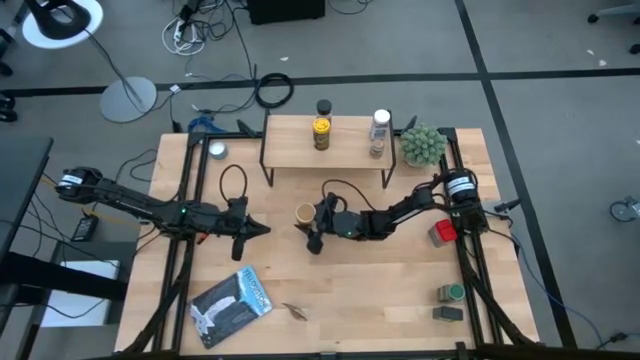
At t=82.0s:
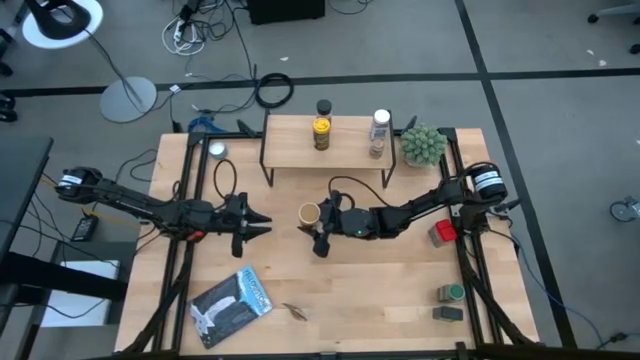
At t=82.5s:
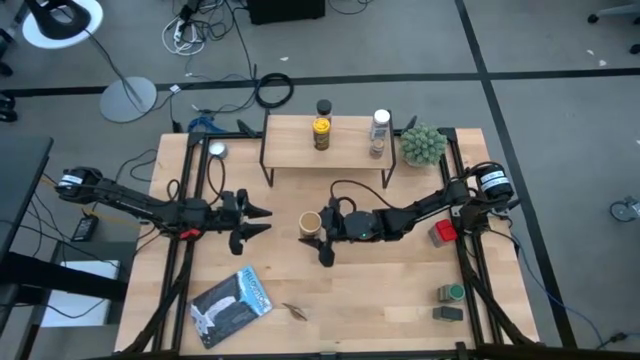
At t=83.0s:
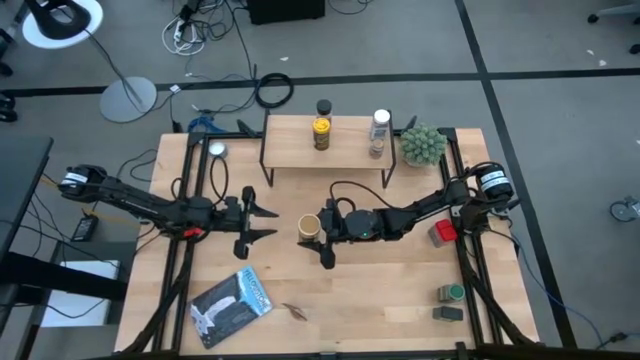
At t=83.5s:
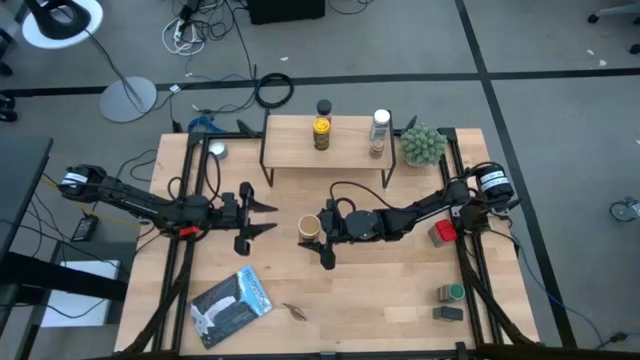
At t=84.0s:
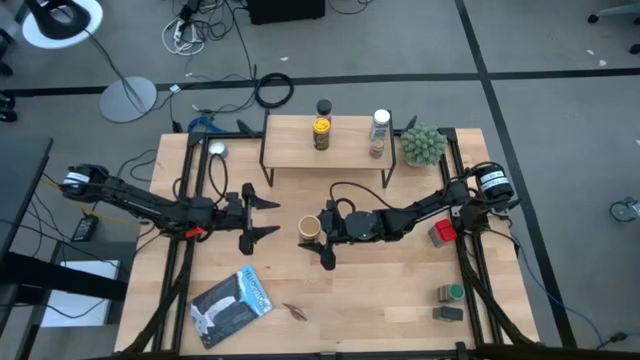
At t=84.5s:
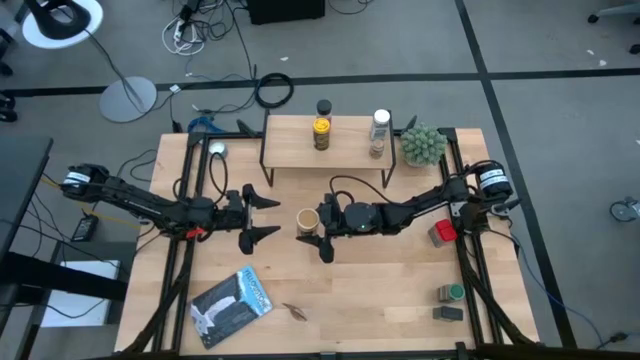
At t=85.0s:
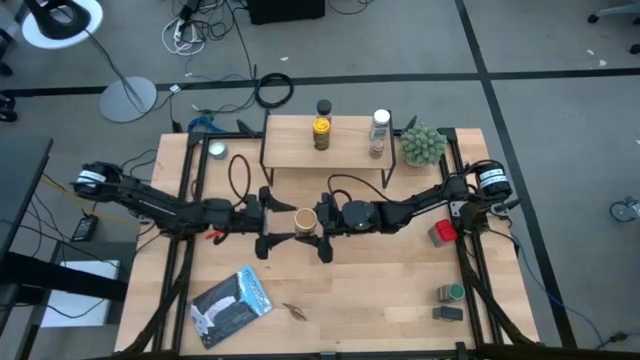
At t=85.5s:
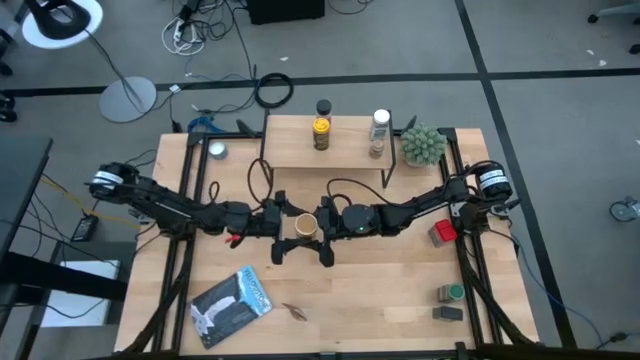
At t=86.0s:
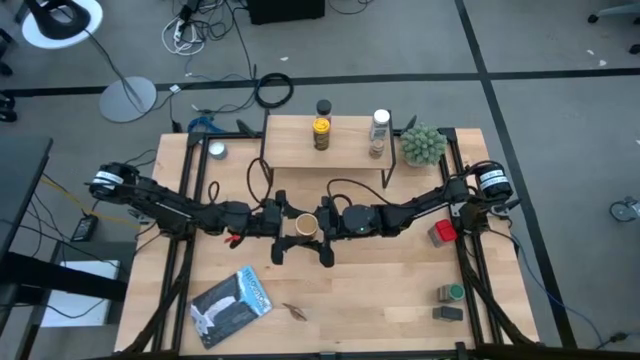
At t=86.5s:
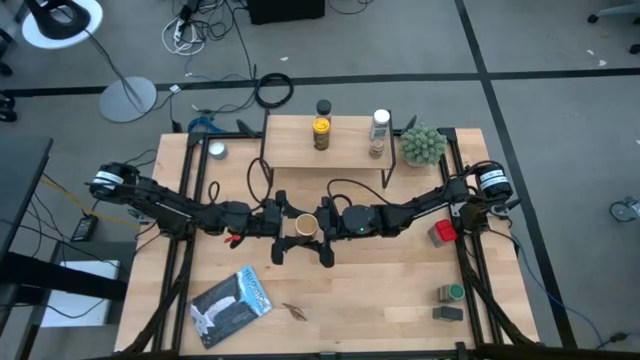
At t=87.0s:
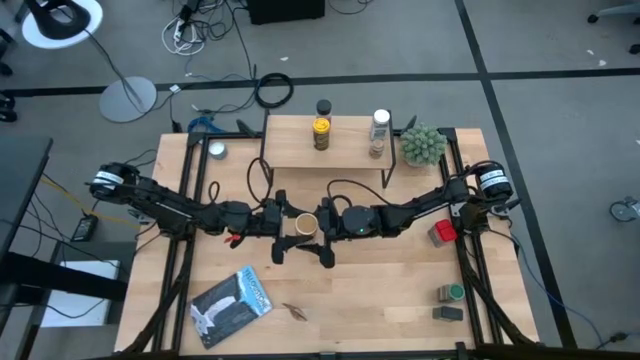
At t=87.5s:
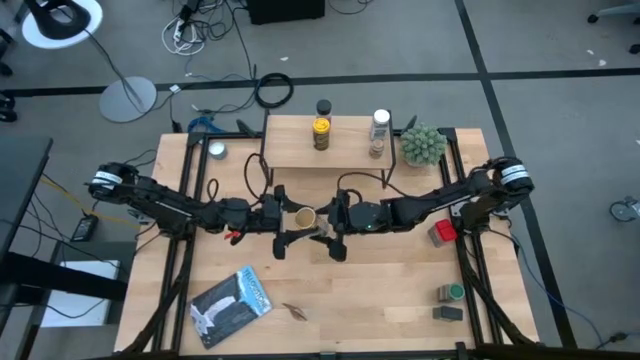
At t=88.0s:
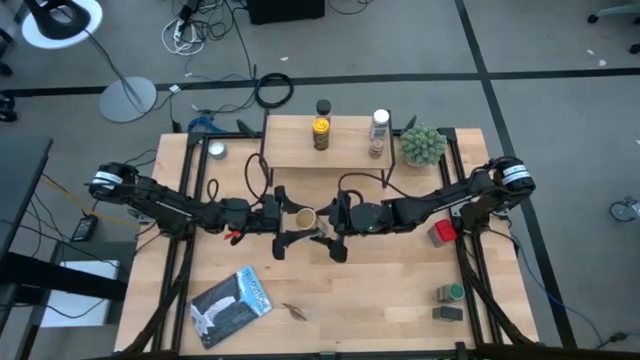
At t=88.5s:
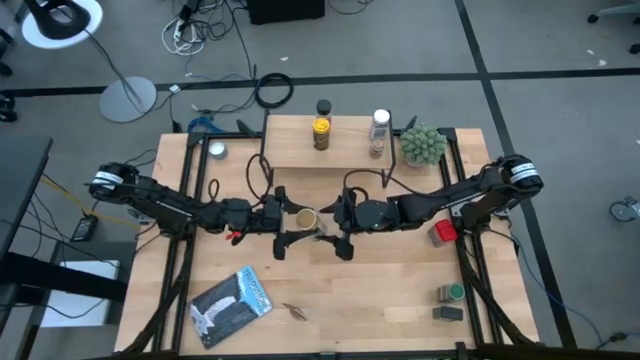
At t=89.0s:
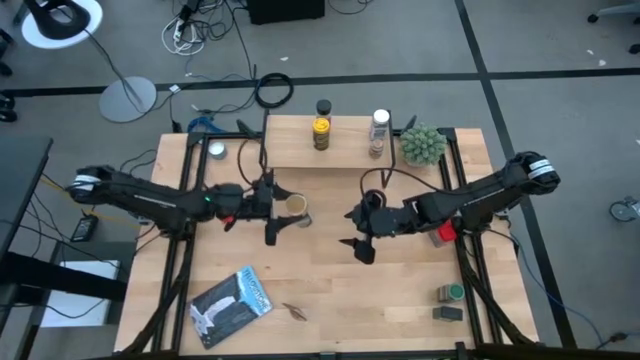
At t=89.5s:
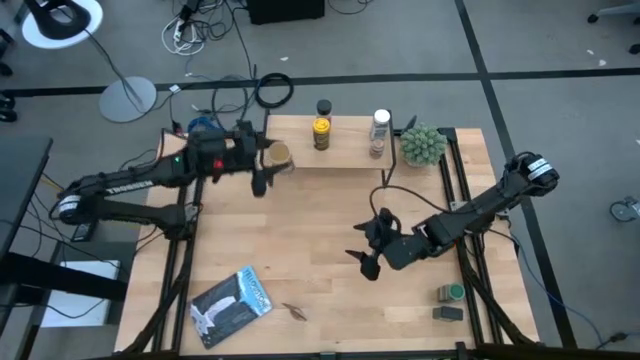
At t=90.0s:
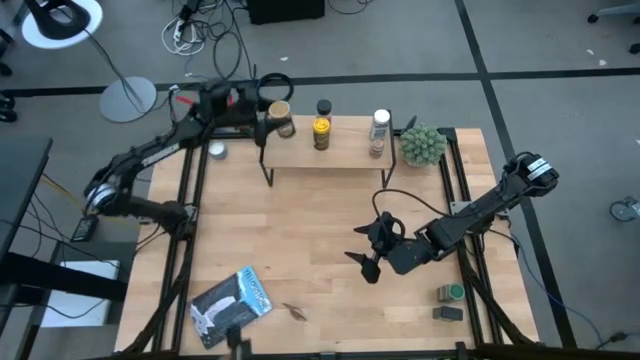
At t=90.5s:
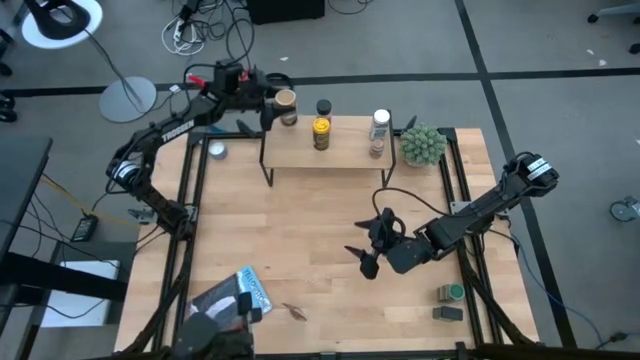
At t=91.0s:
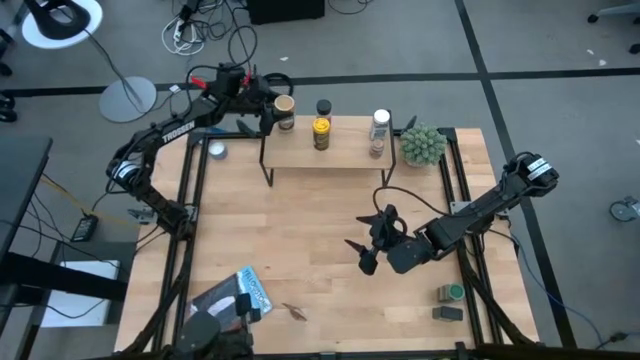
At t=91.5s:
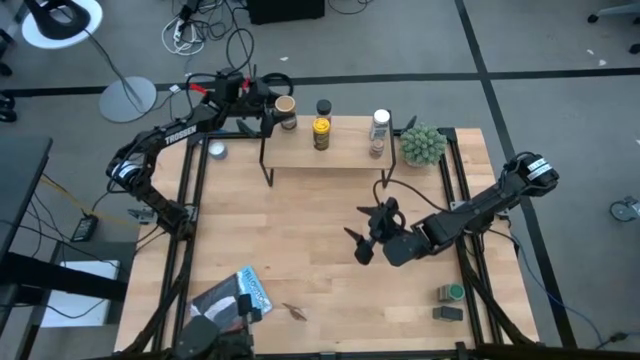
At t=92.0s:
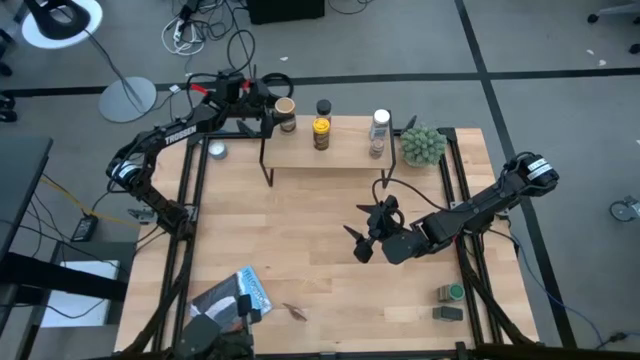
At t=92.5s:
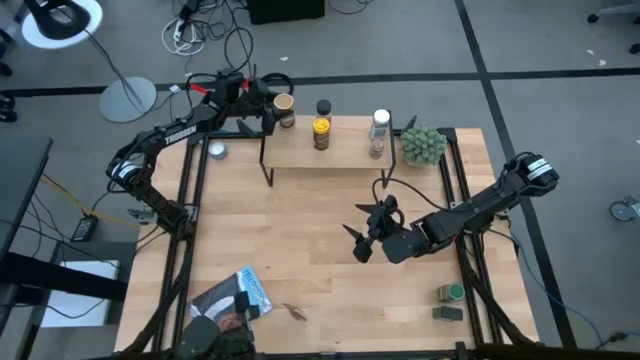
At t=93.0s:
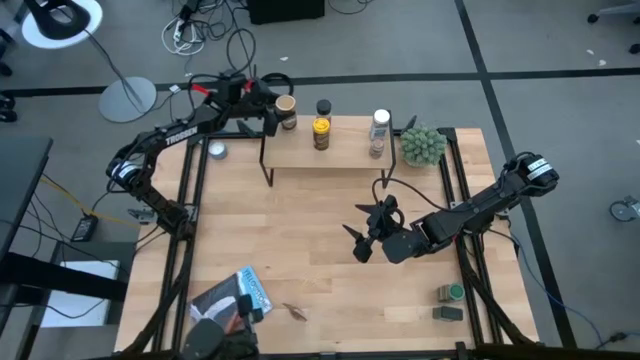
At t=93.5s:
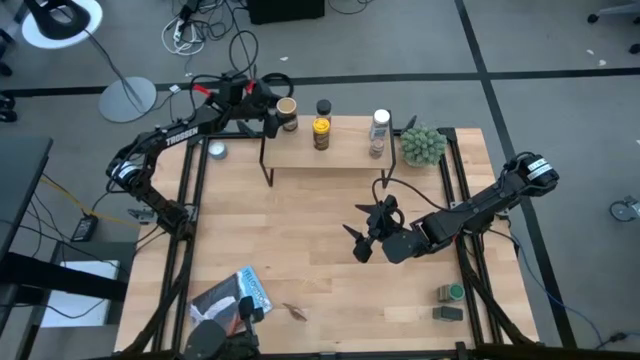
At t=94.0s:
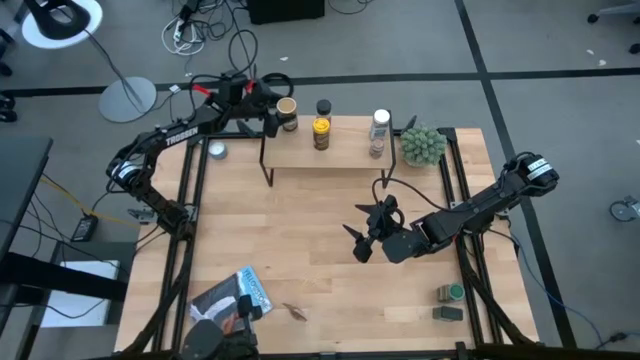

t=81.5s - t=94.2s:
Task: Shelf spices
Put the brown seasoning bottle on the shelf

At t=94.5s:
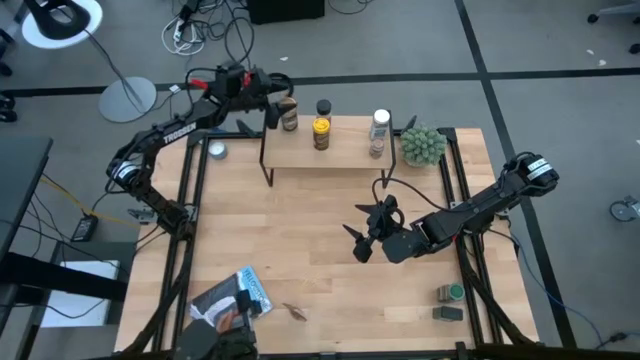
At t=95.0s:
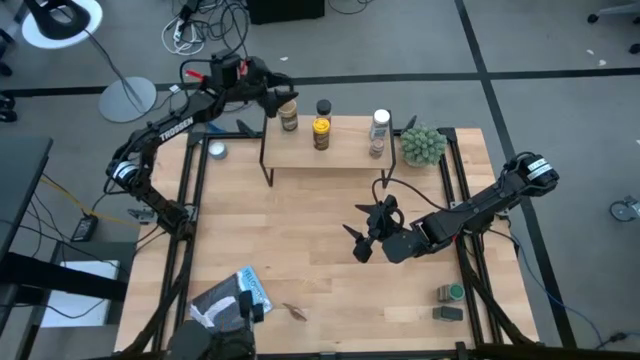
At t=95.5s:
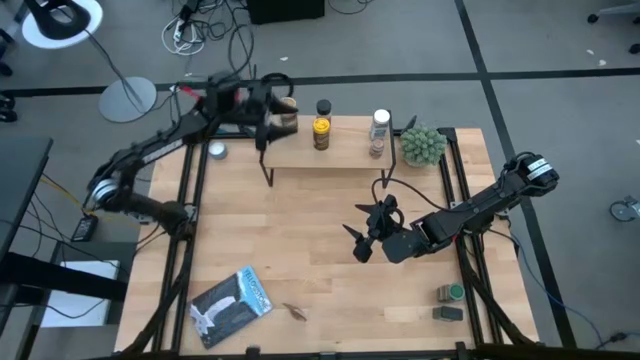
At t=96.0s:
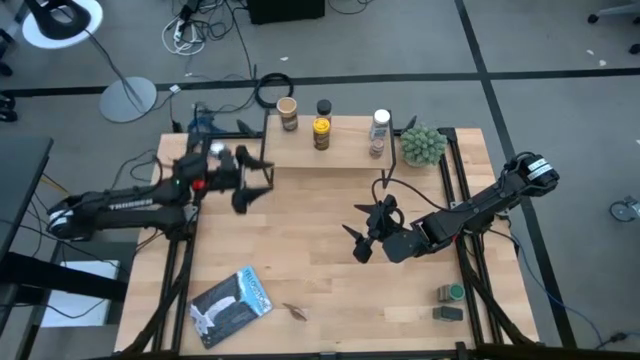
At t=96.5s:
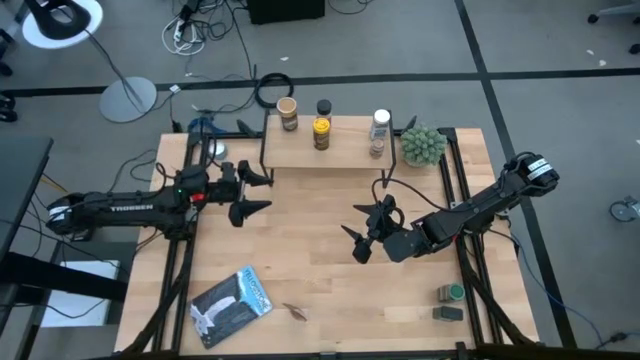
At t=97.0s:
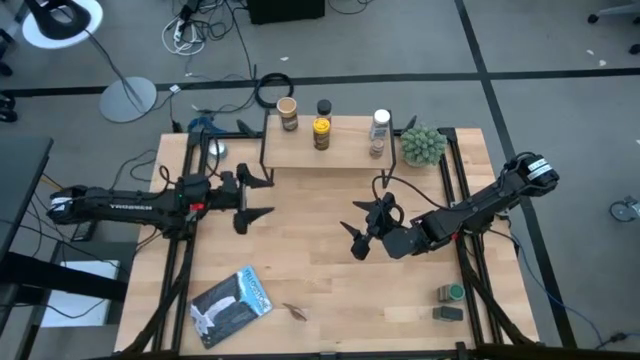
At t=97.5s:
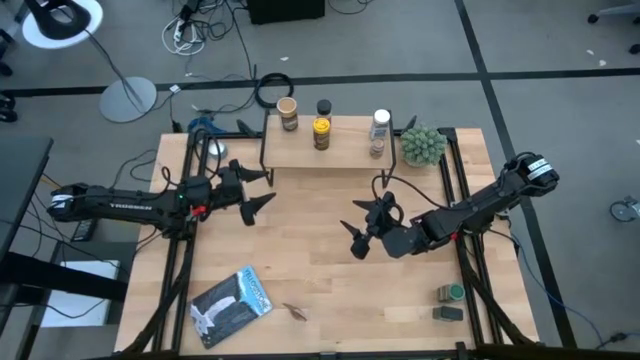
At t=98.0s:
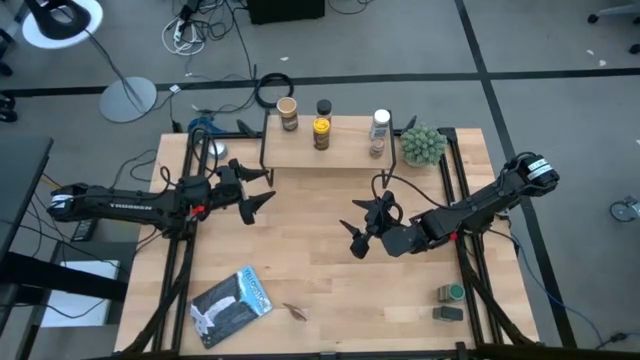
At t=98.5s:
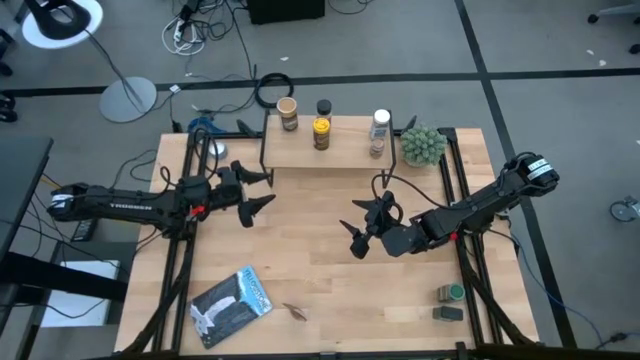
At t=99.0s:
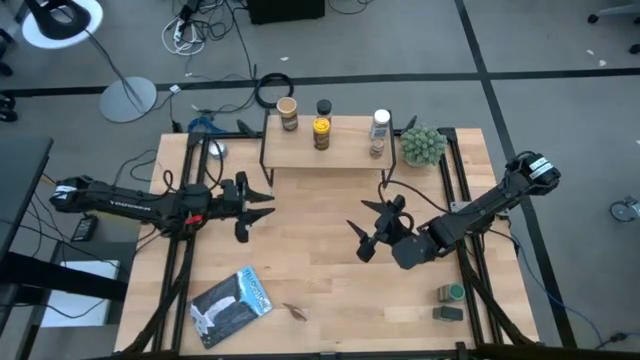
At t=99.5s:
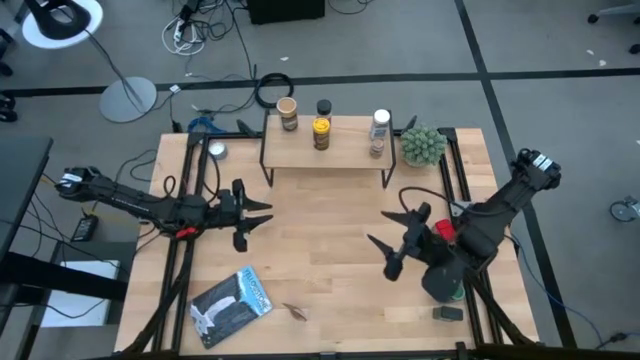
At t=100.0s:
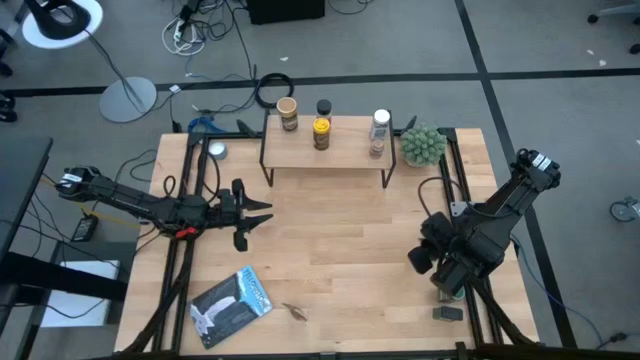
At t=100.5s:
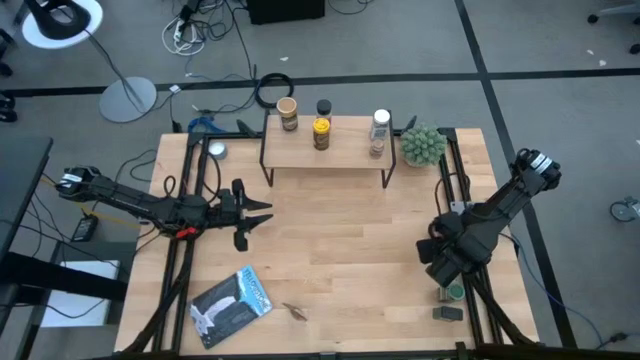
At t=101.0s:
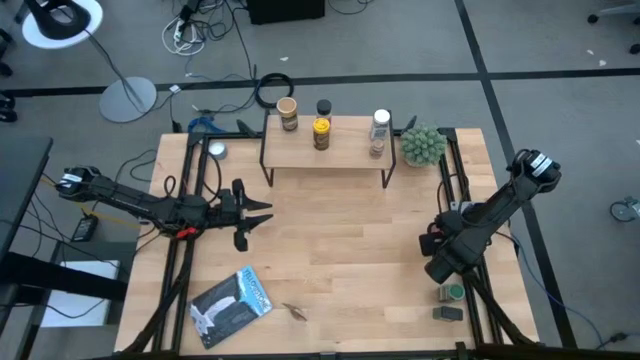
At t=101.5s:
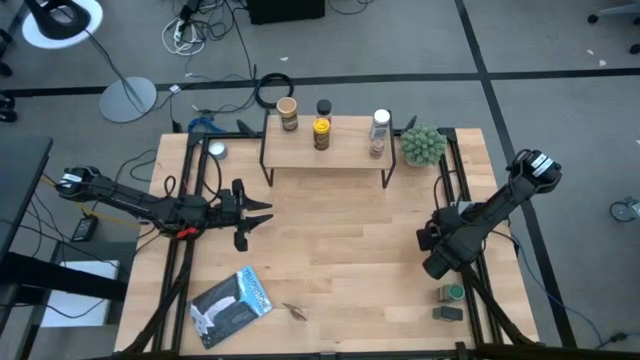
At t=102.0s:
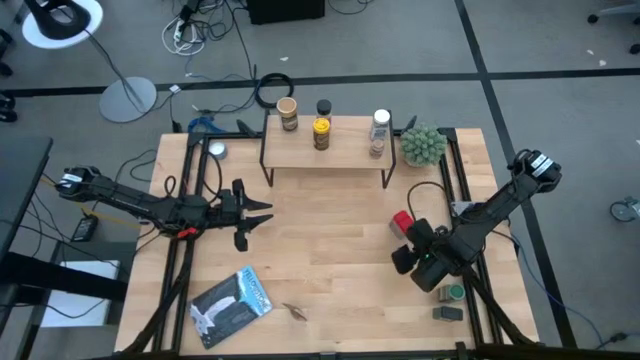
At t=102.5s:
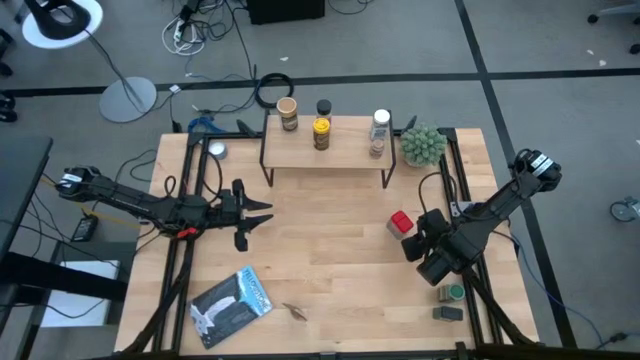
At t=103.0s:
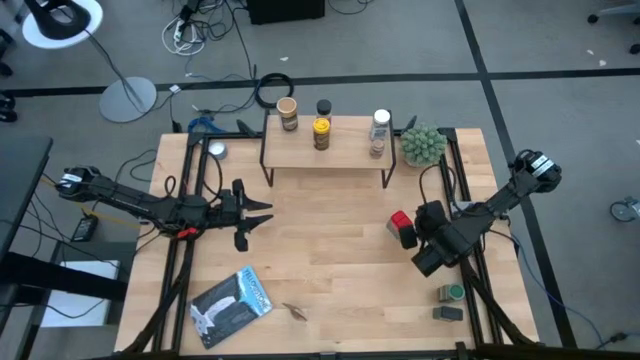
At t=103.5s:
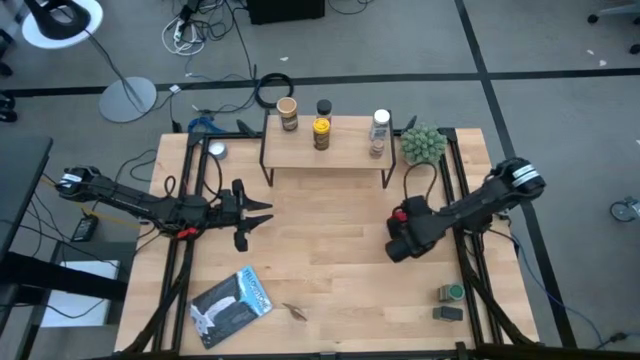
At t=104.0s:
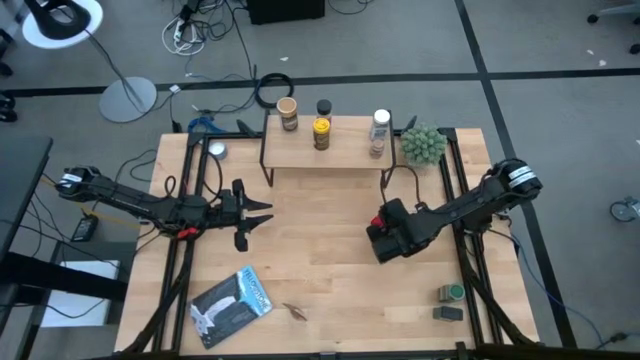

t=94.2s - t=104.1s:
Move the red seasoning can to the center of the table
